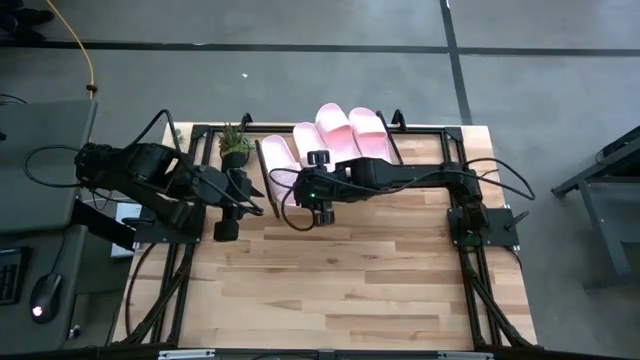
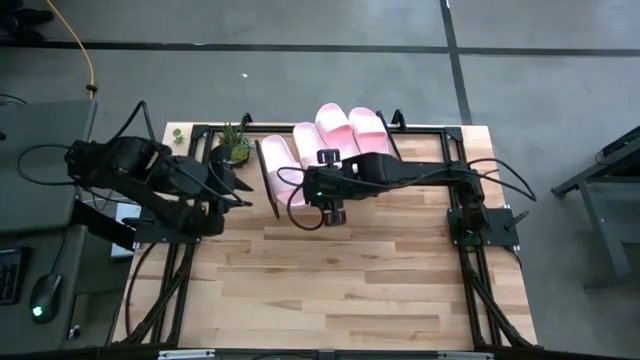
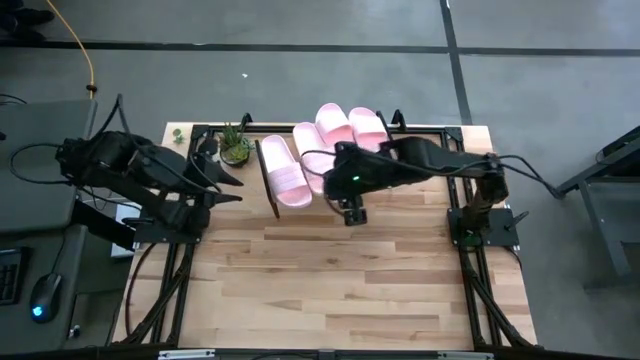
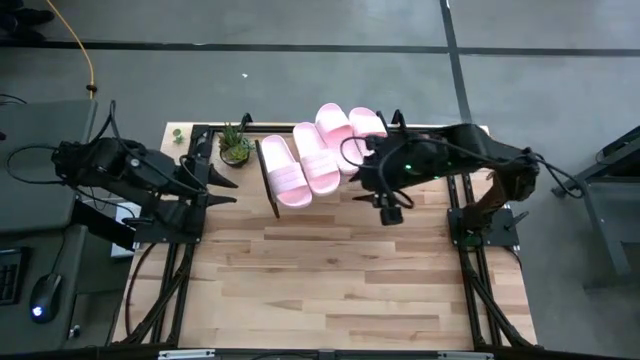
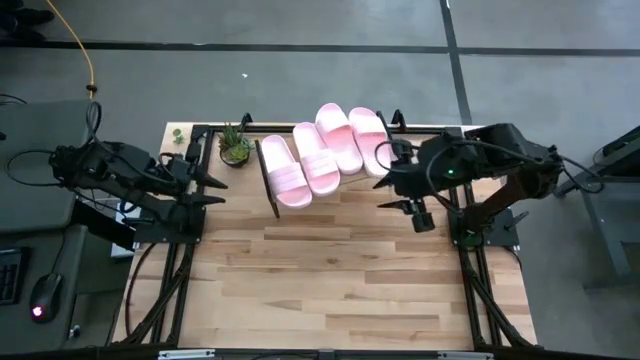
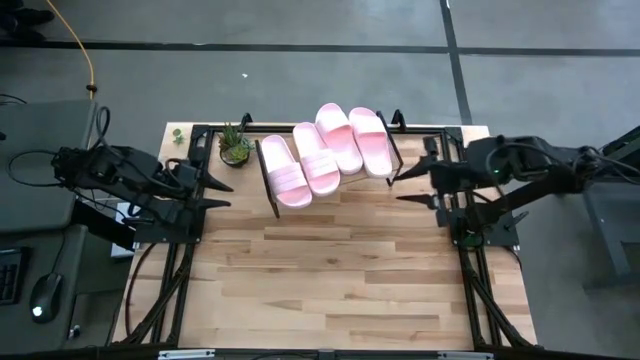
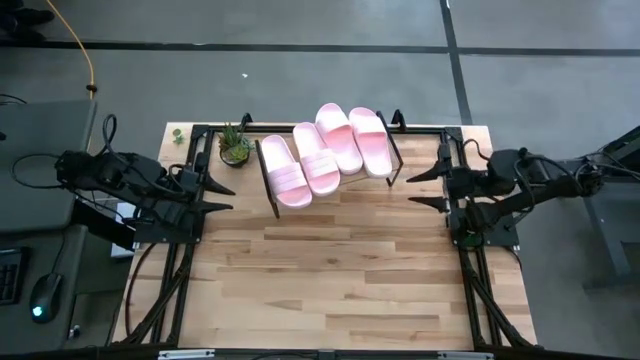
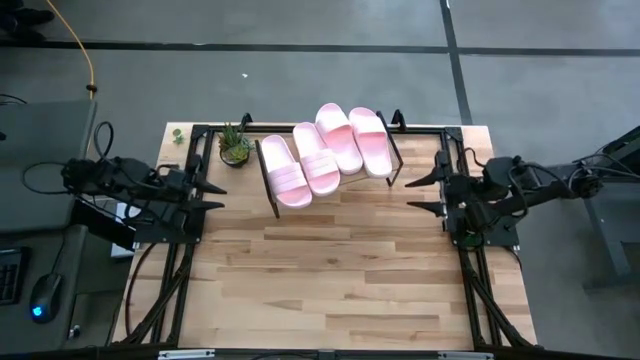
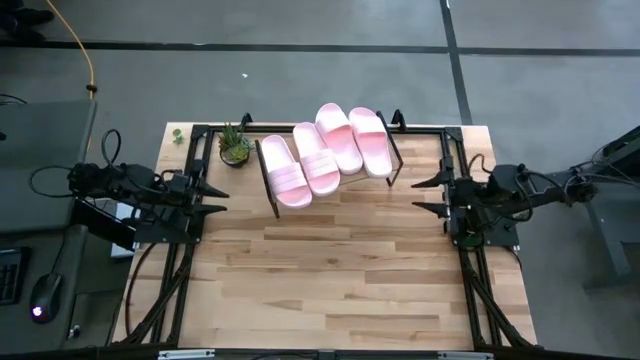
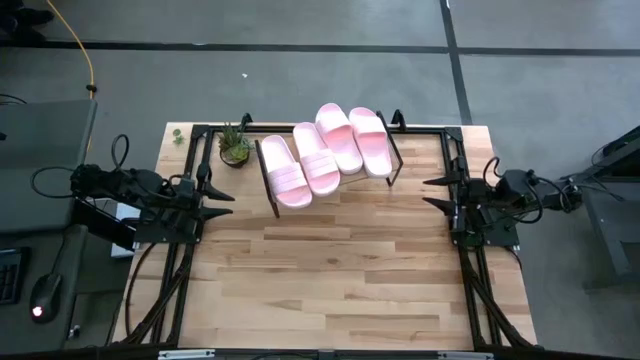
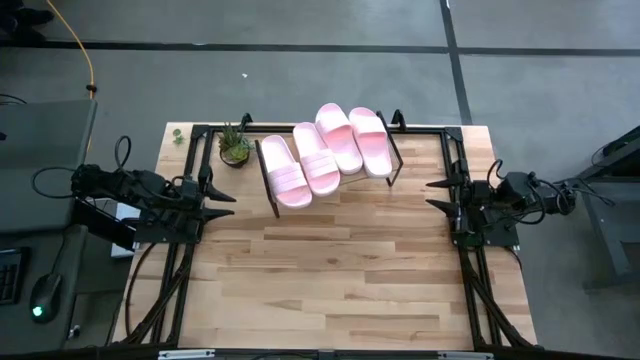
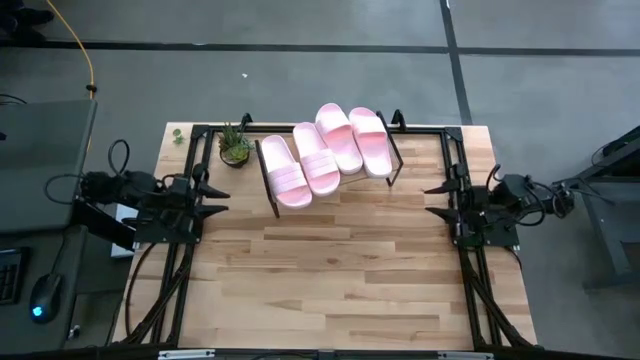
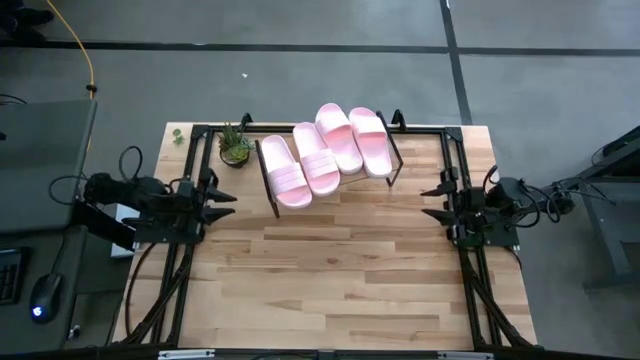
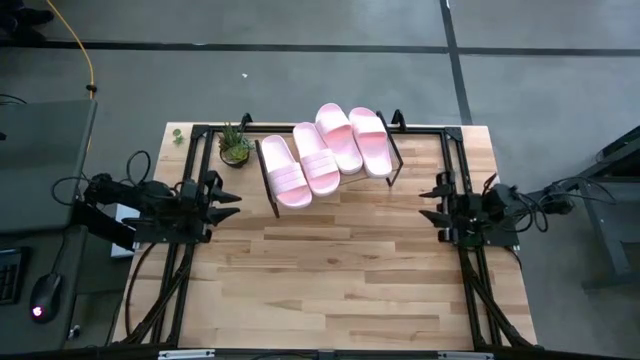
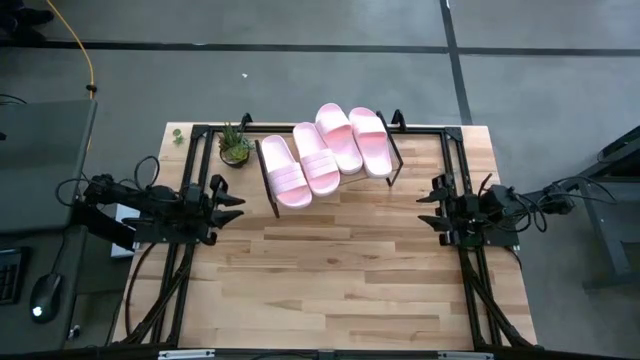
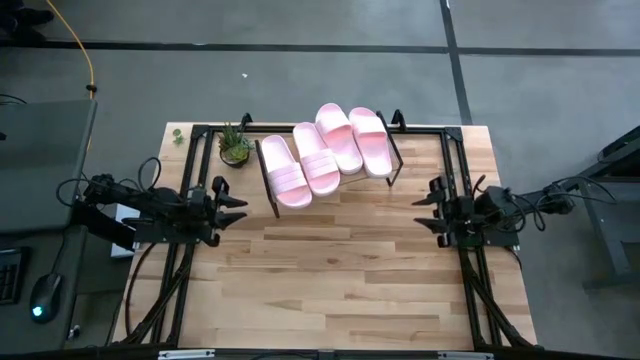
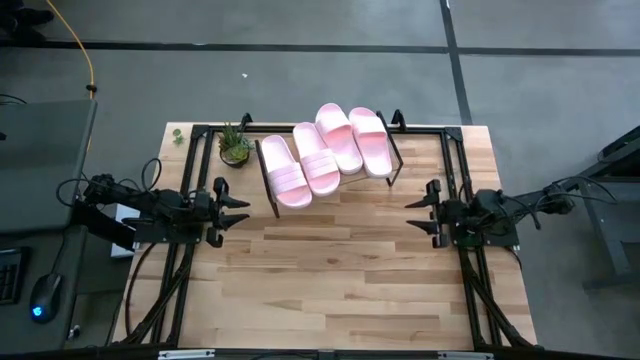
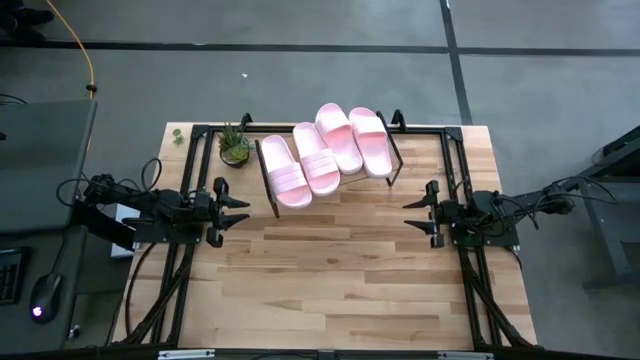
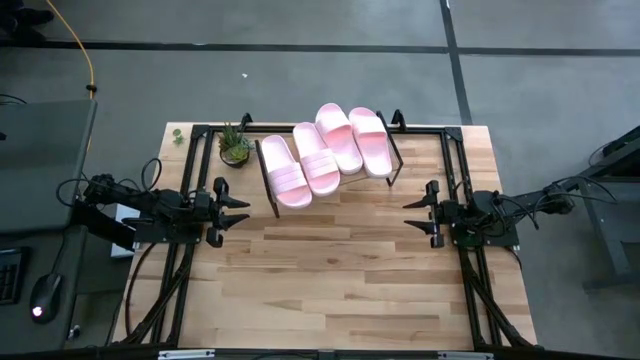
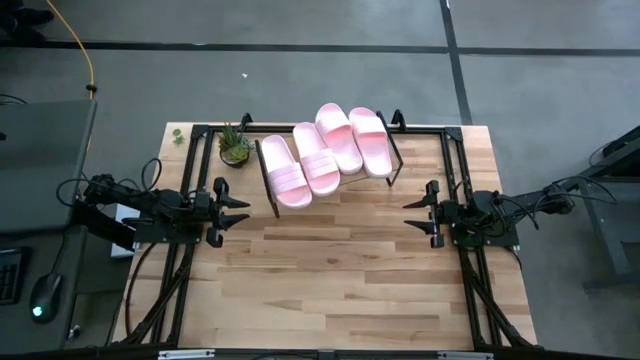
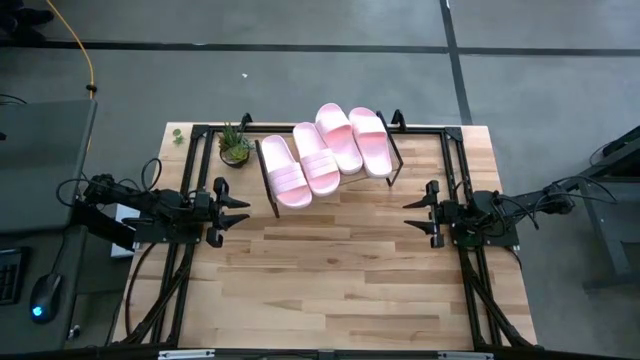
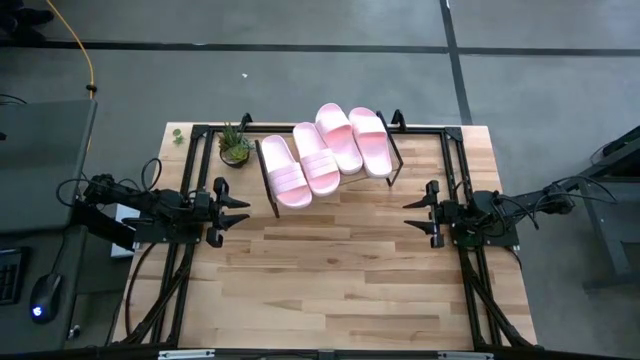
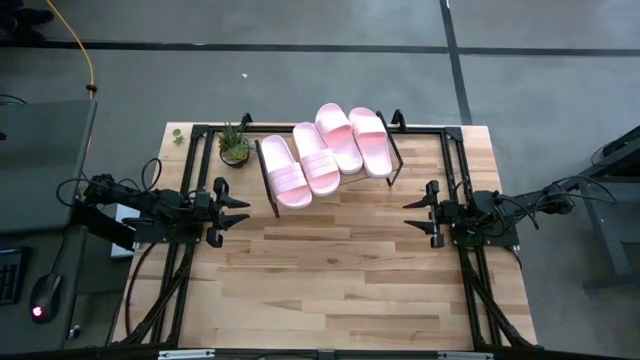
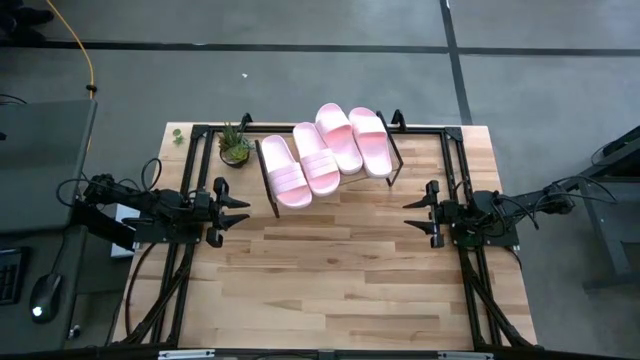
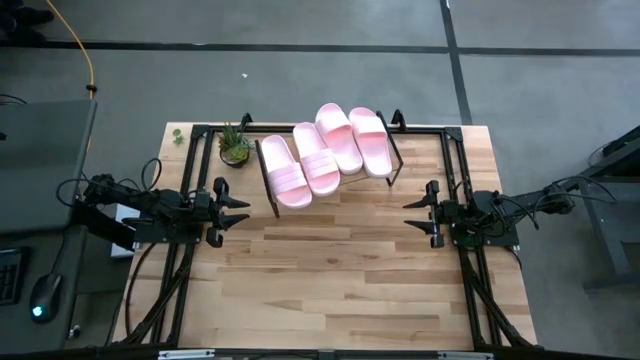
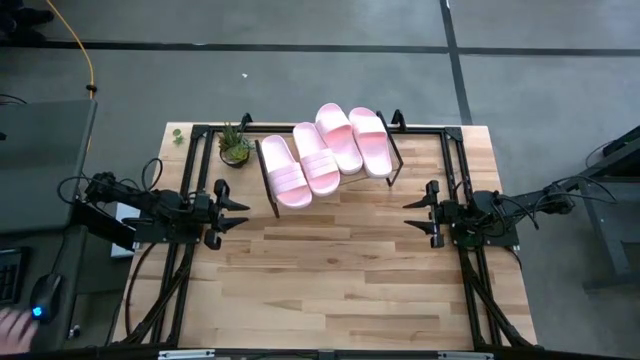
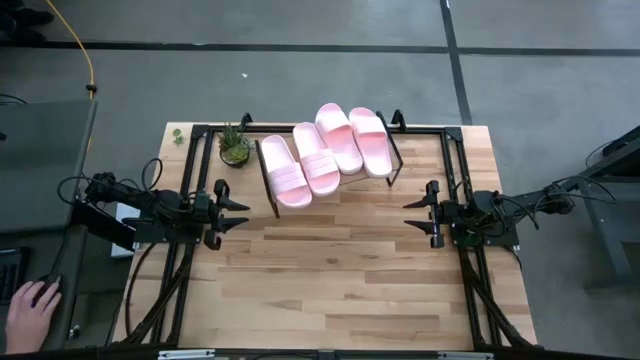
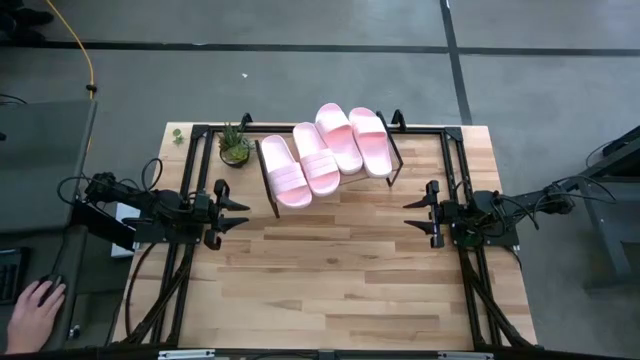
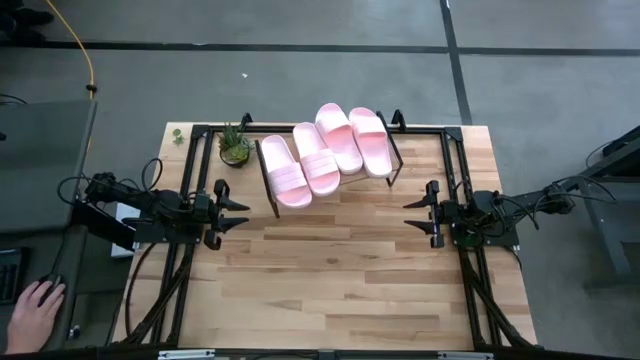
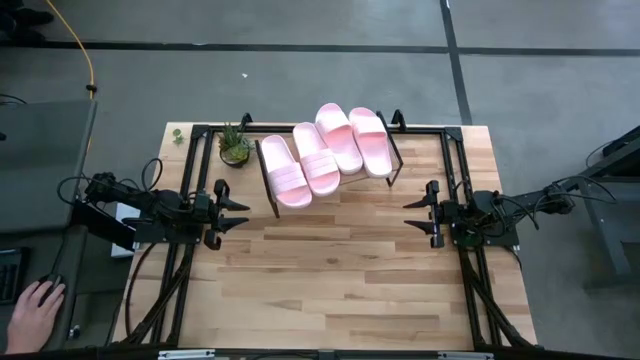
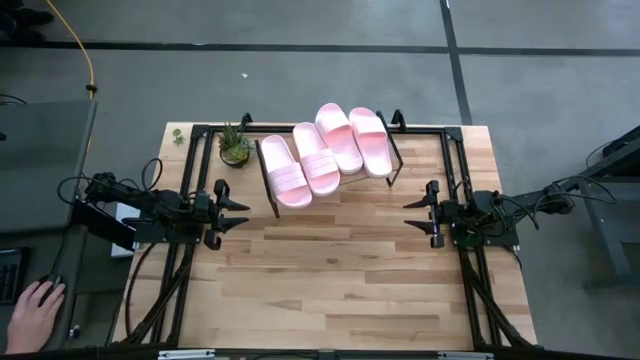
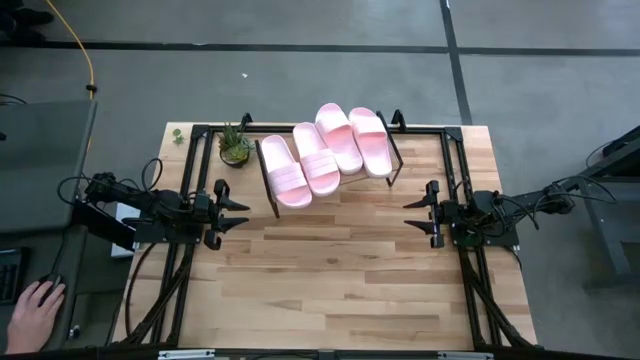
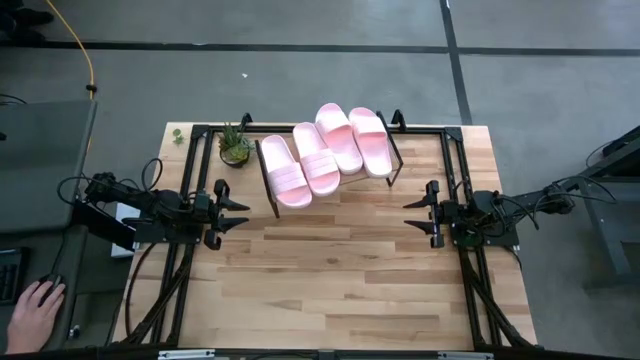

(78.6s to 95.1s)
Task: Pick and place slides into the shelf
Return to Home Position

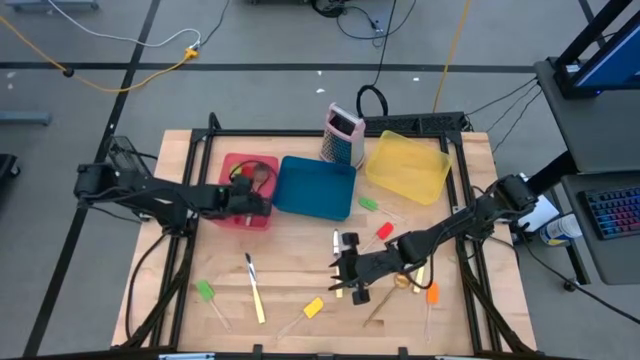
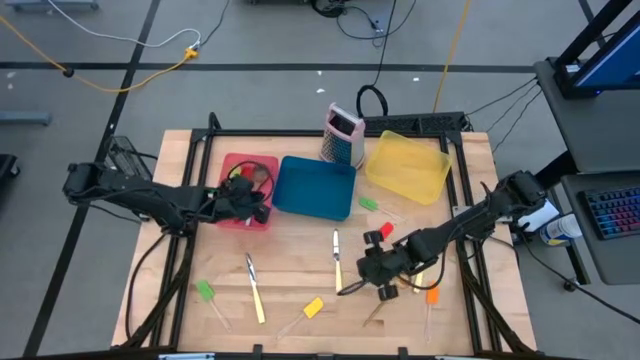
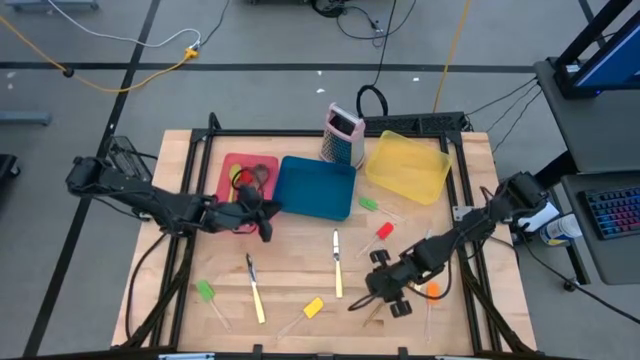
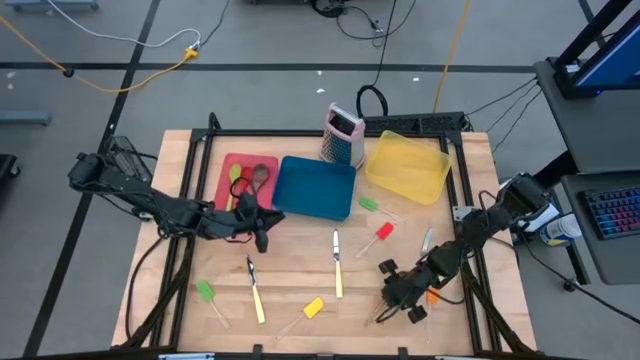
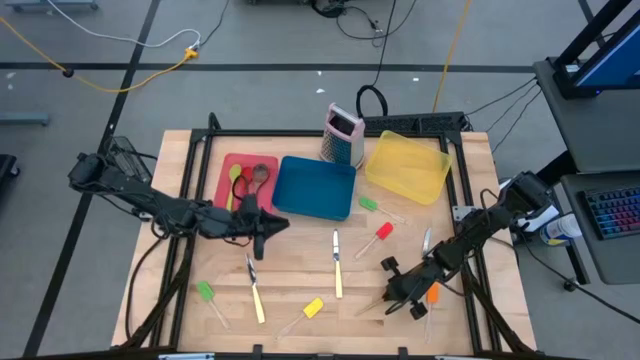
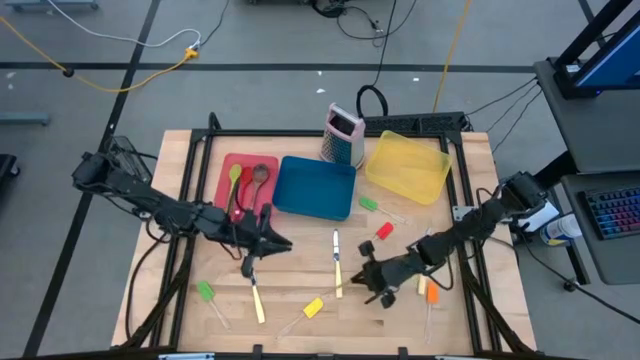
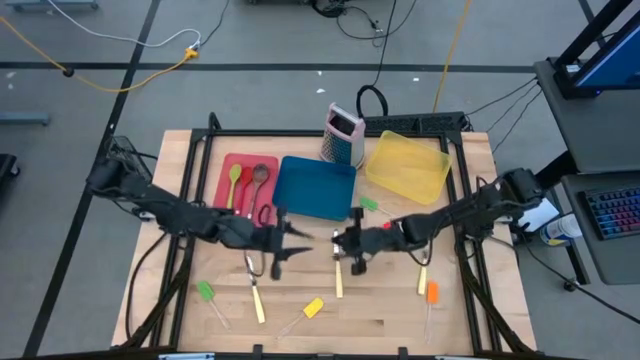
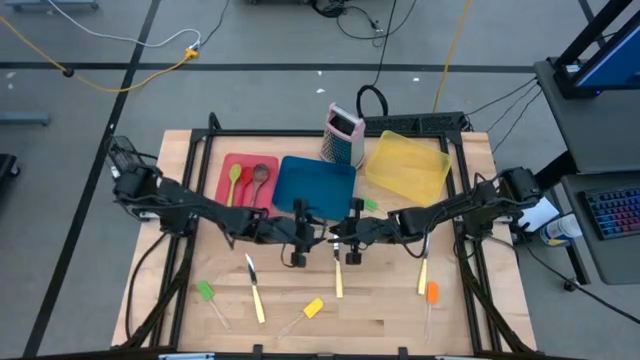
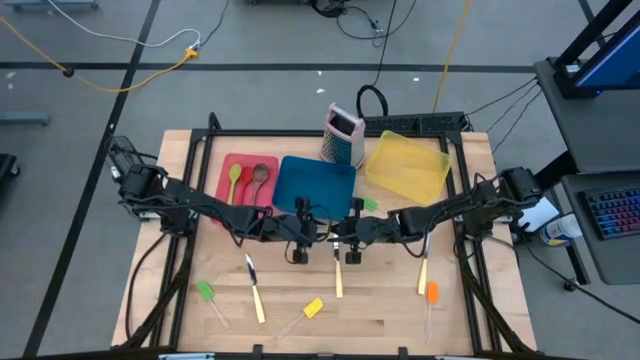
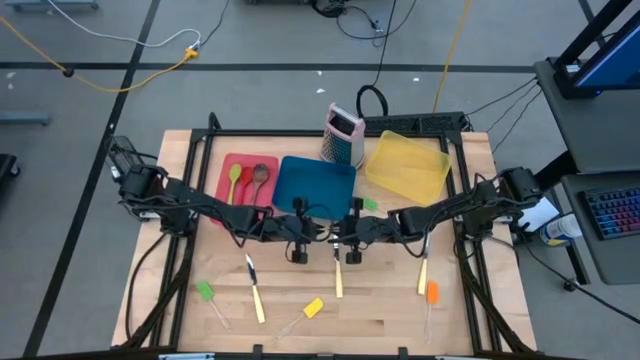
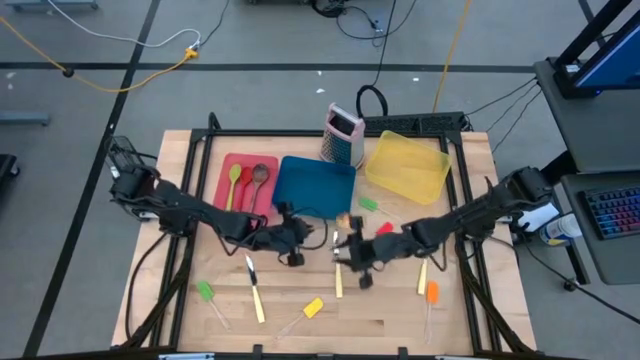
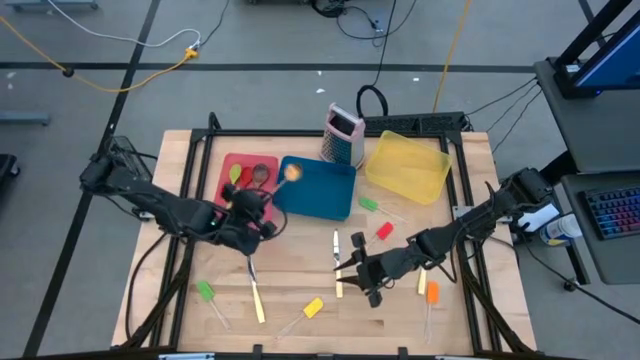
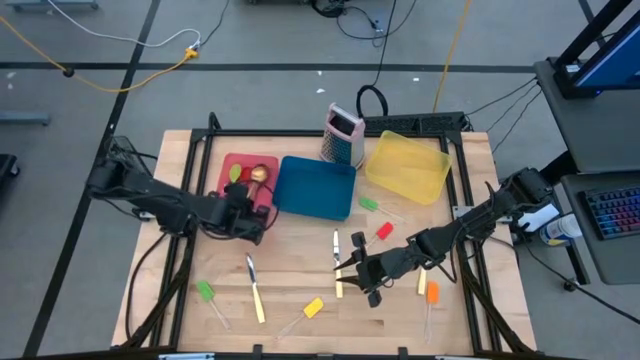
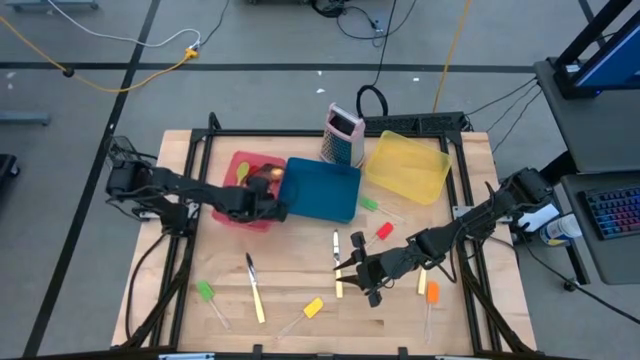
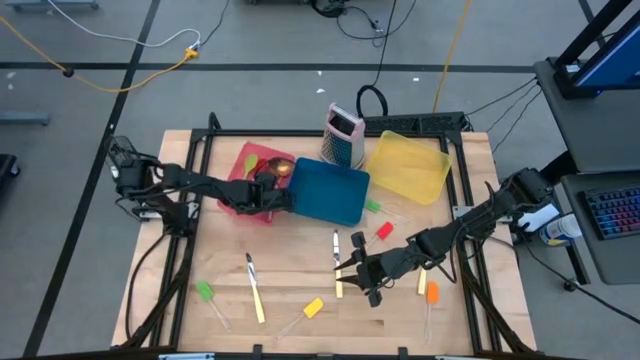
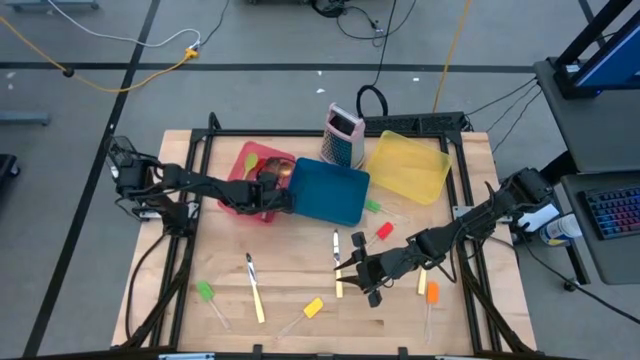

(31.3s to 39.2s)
Task: Pick & Place Kitchen Items
Put the gold spoon into the red bin
